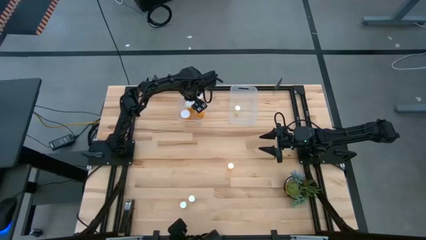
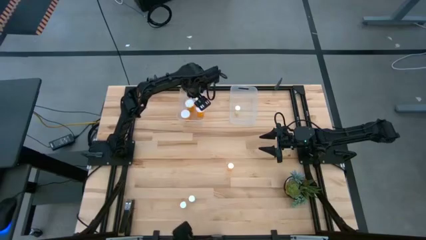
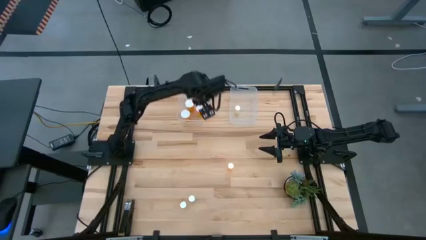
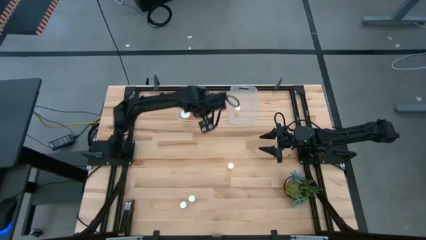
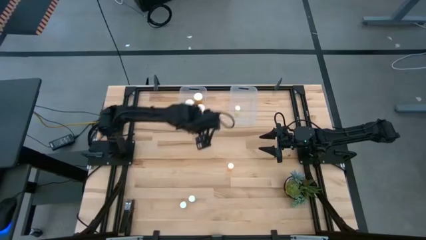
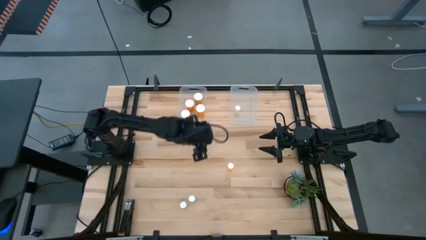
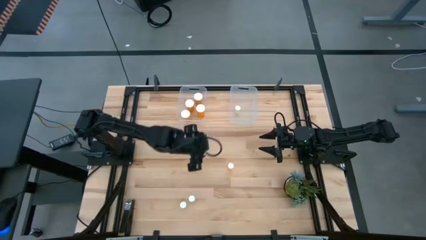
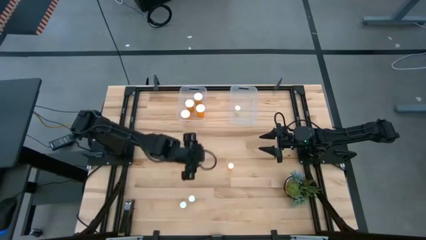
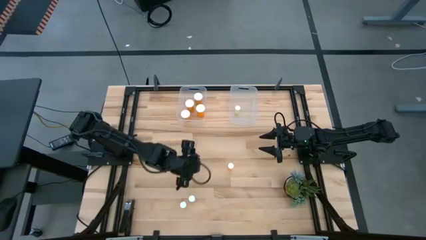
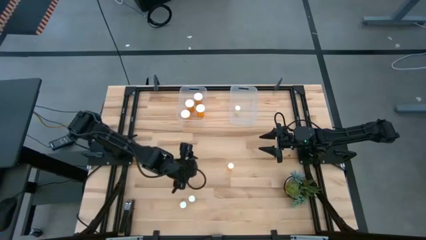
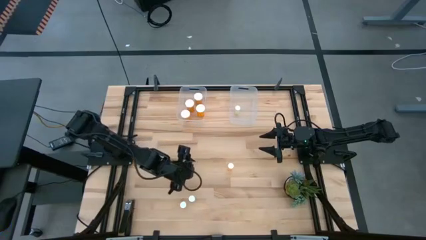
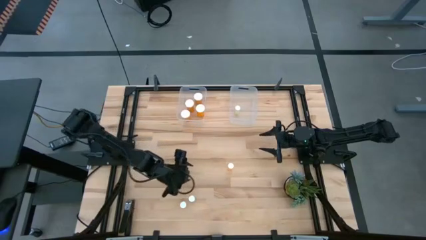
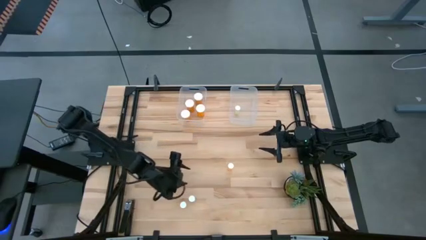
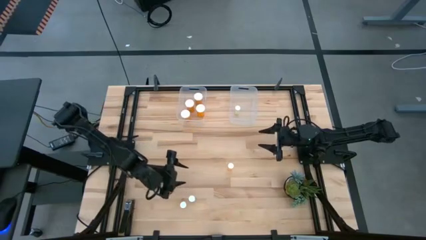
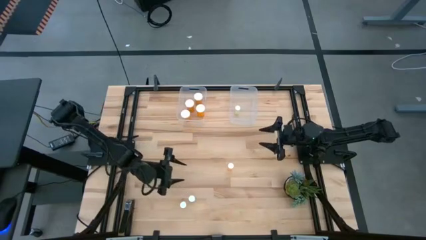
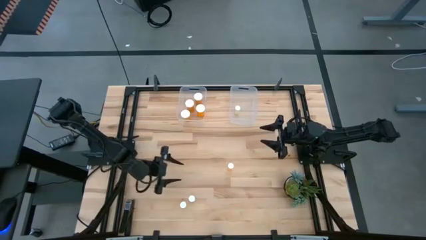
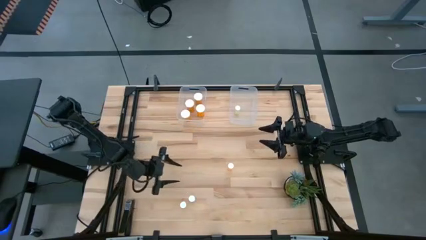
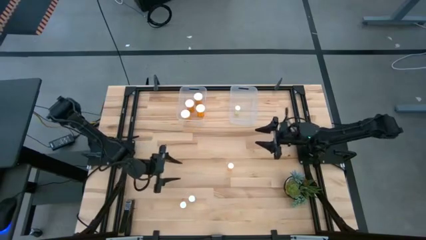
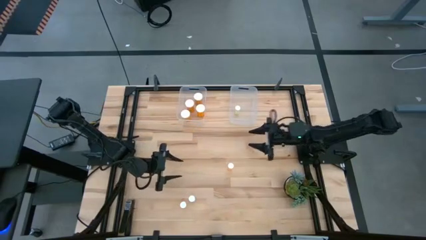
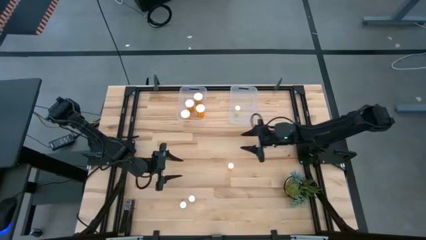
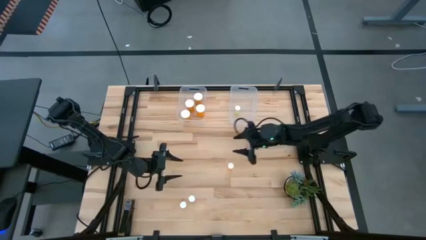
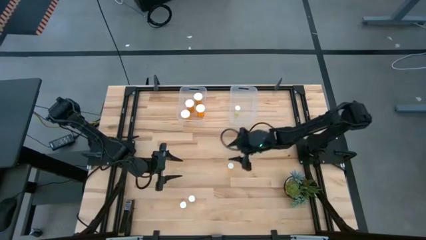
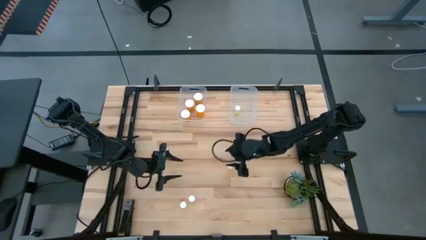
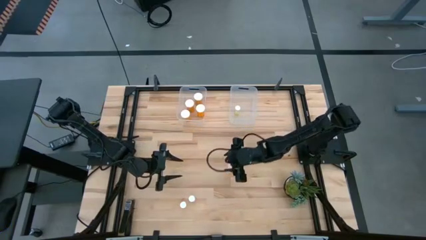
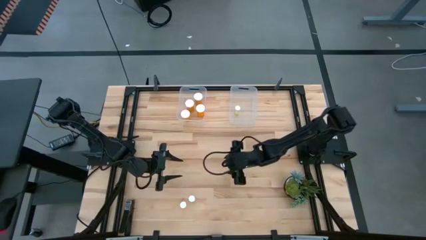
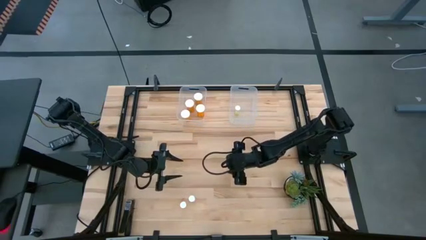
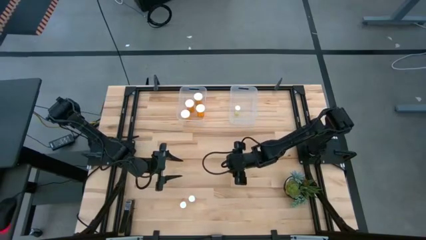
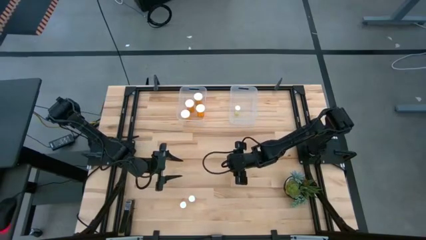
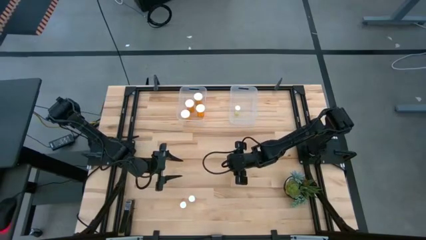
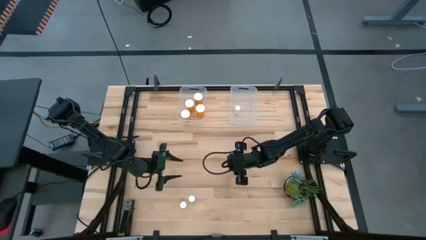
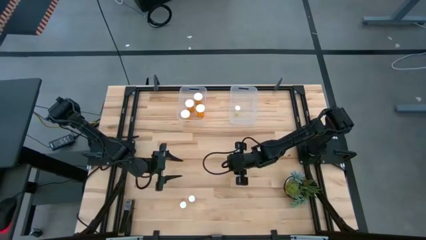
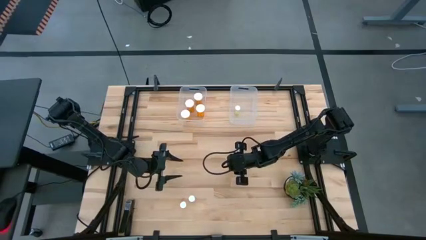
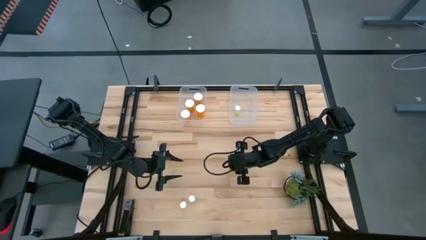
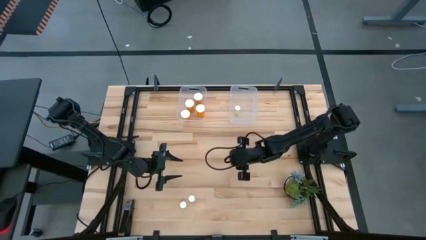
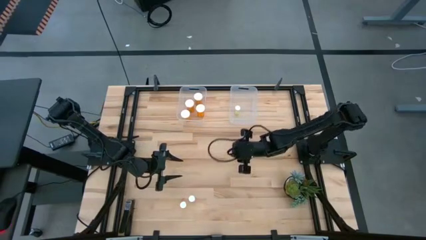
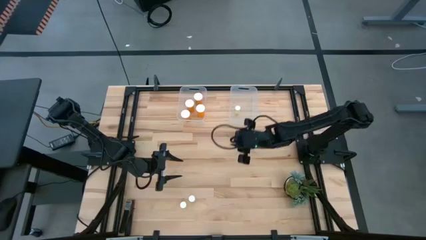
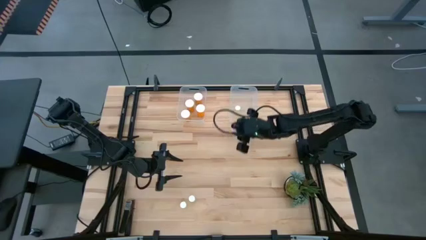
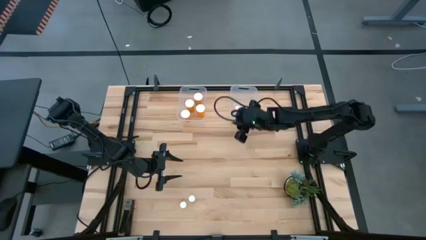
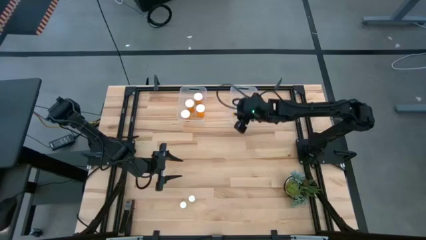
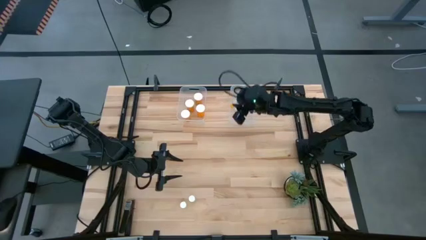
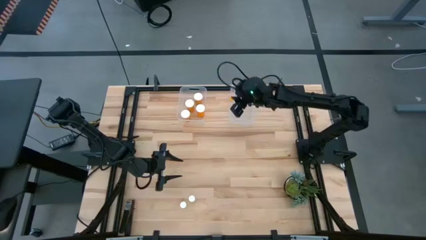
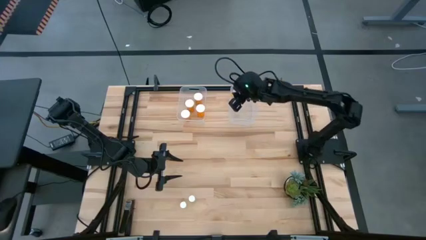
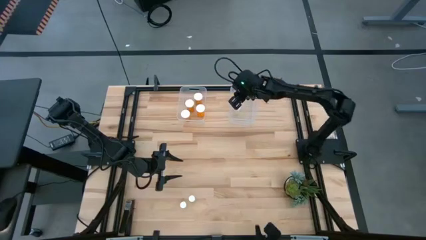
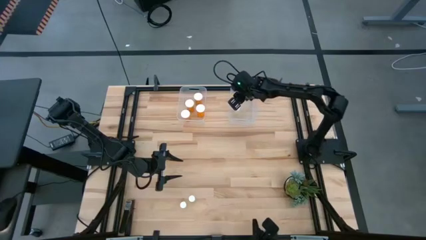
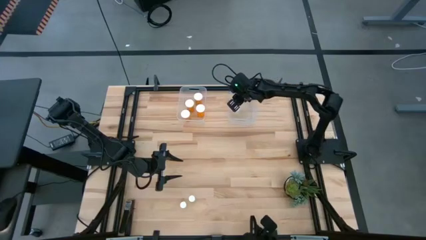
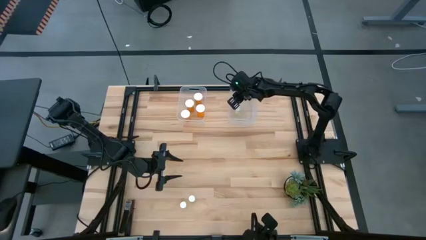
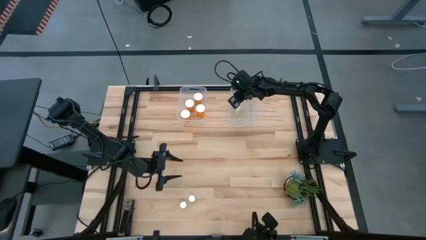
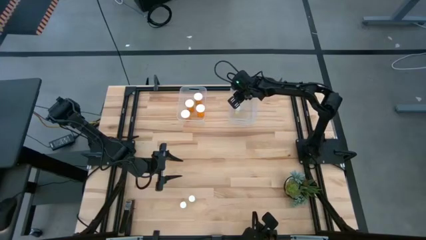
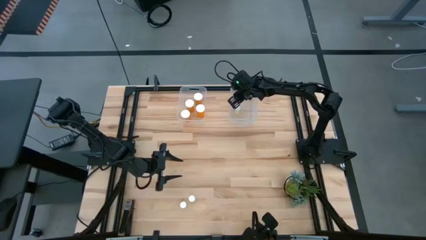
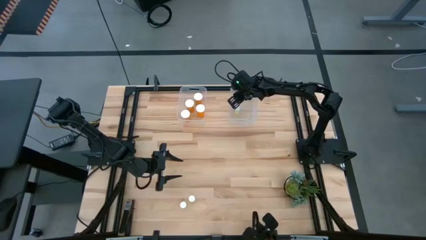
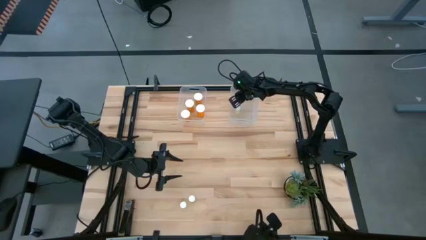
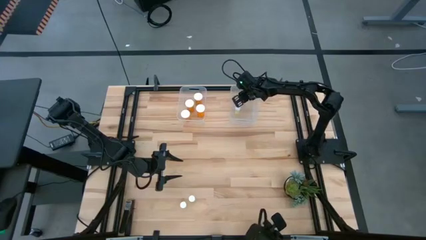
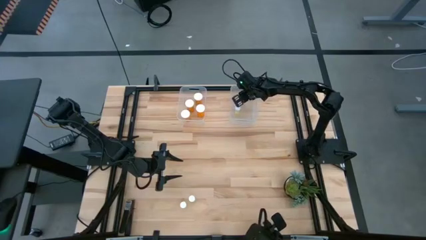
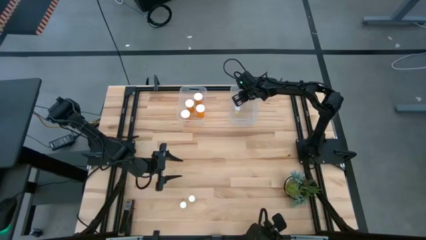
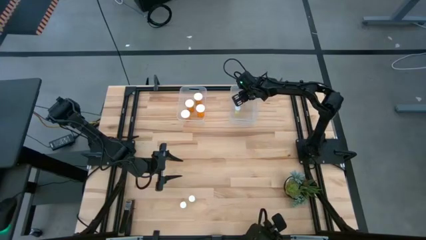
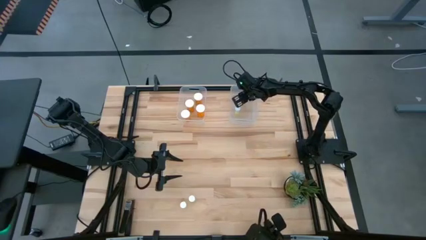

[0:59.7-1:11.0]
Task: Pick and place medicine bottles into bin by pill shape (circle, oval)
Put the small orange pill bottle into the left transparent bin

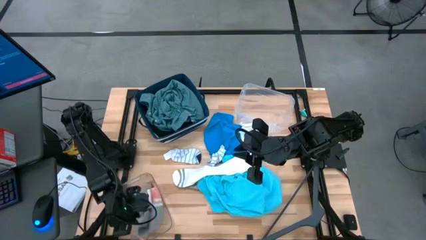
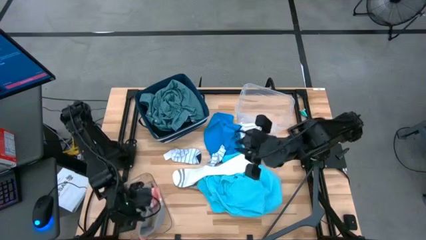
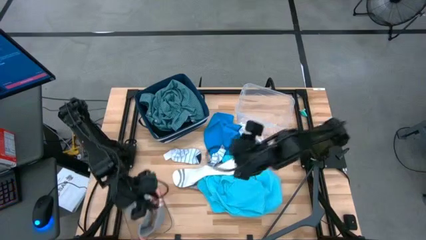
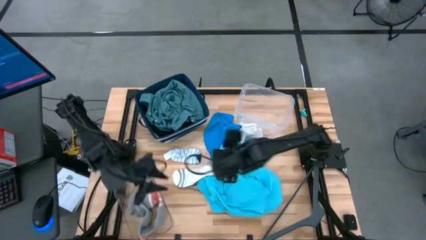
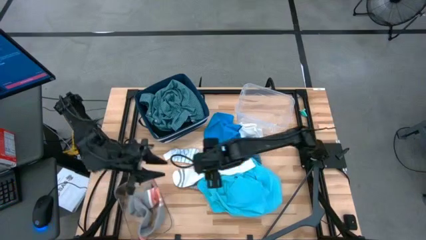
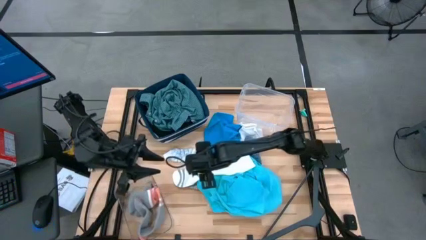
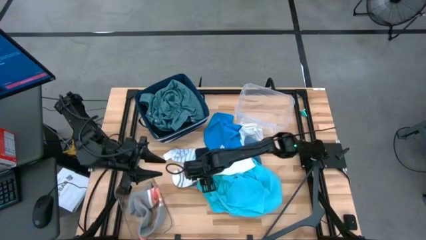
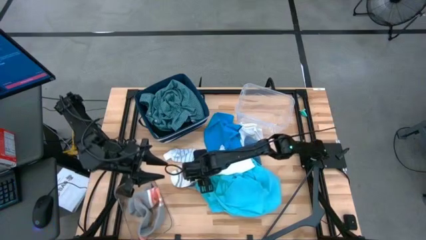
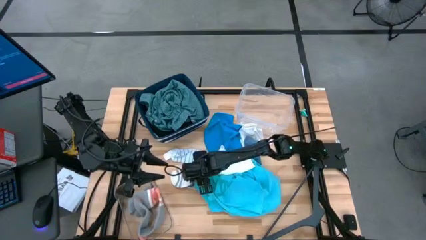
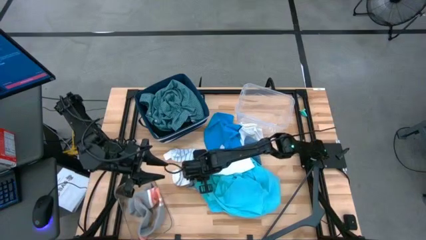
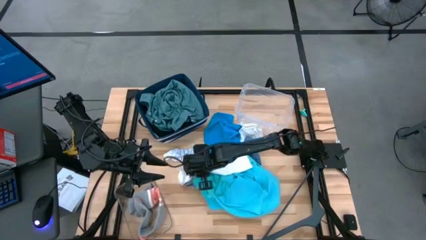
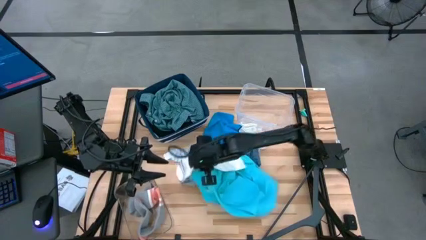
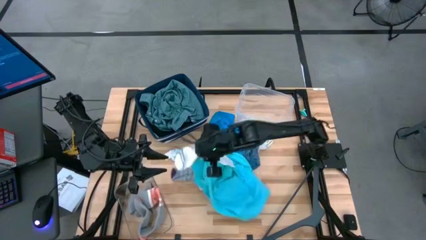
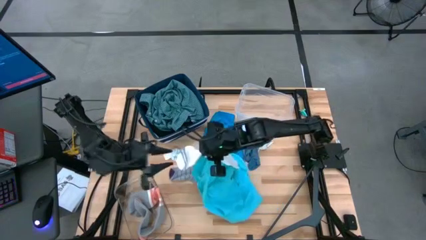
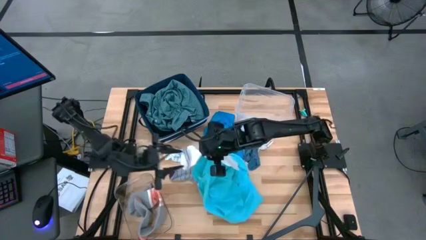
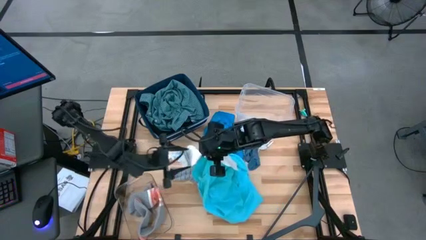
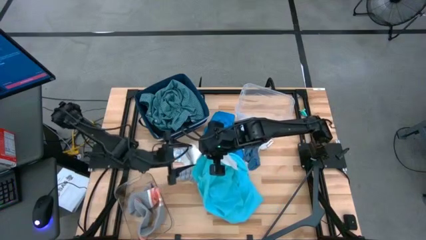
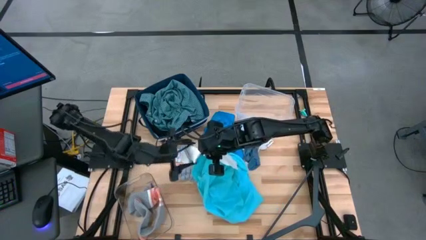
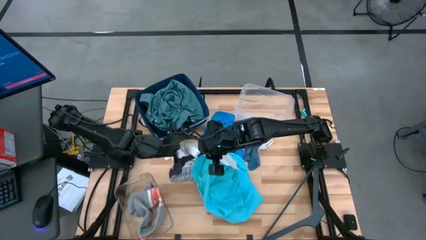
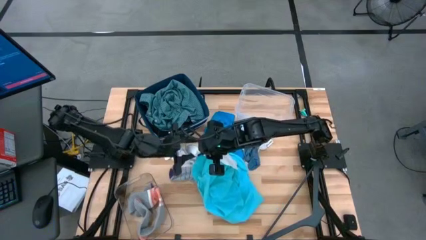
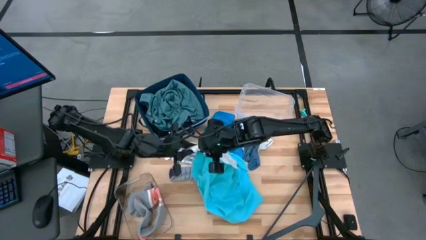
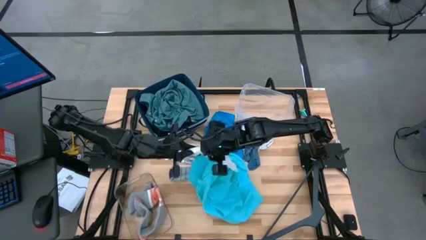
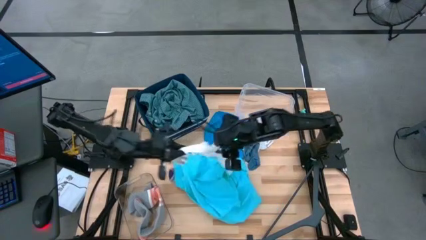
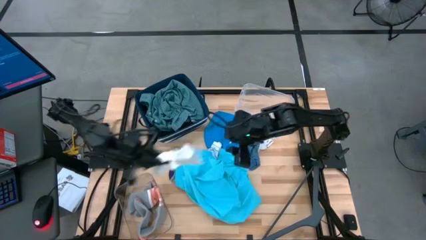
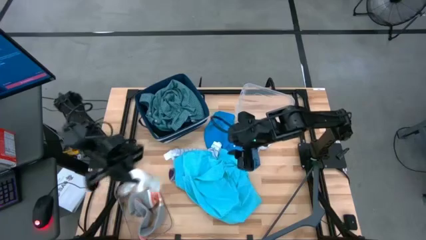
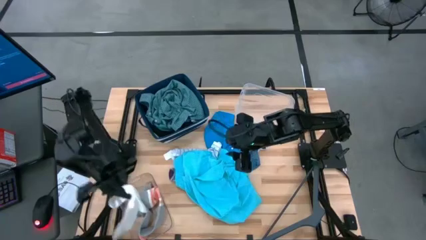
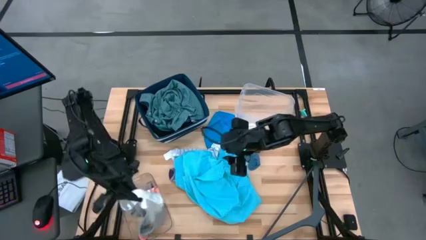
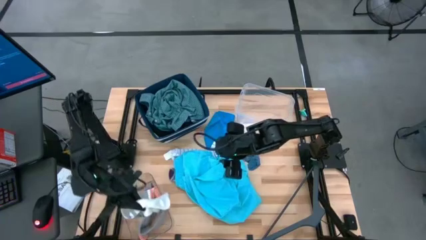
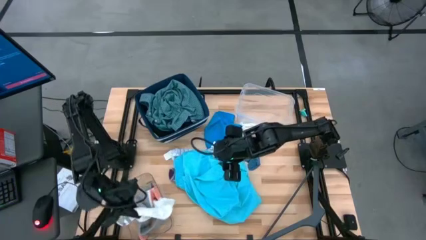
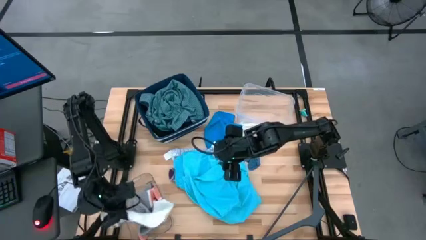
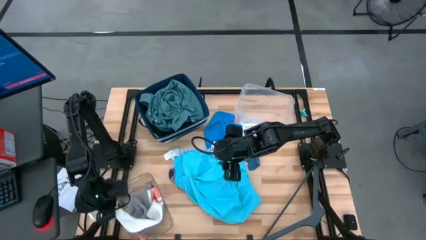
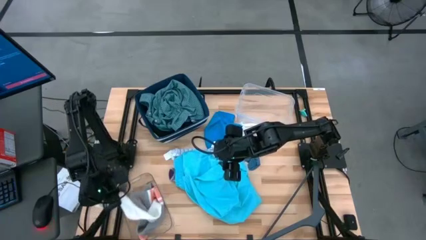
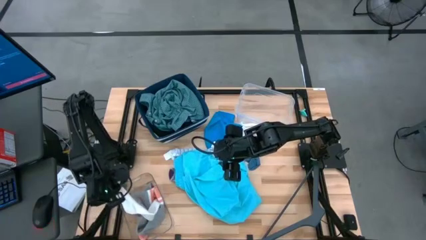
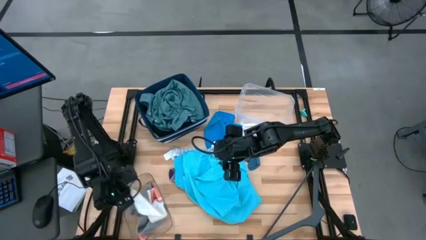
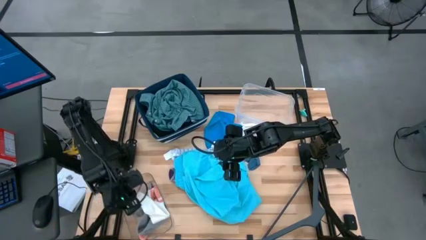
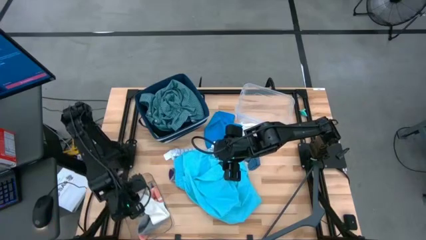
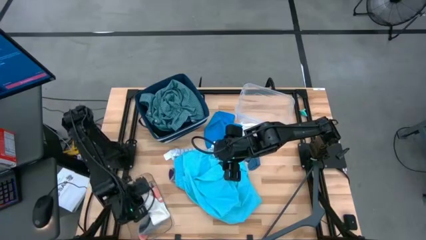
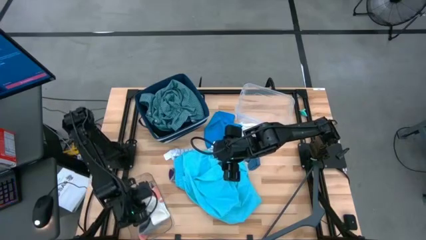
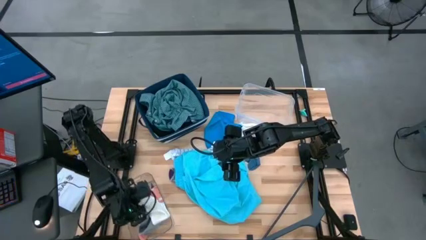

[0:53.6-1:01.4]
Task: Pick & Place Cloths
Put the white and gray sock into the transparent bin
